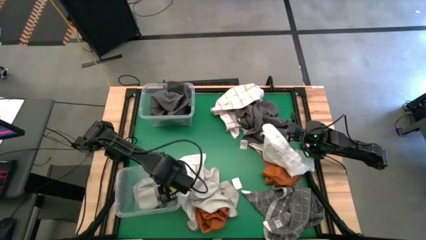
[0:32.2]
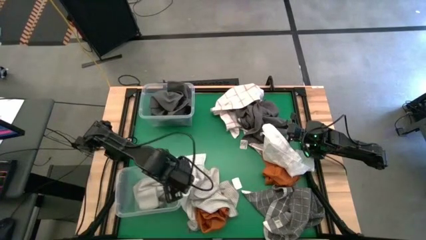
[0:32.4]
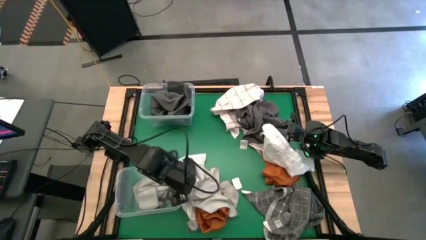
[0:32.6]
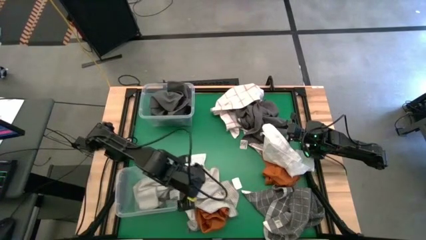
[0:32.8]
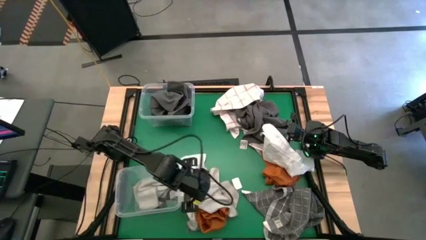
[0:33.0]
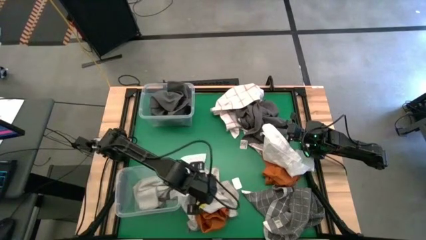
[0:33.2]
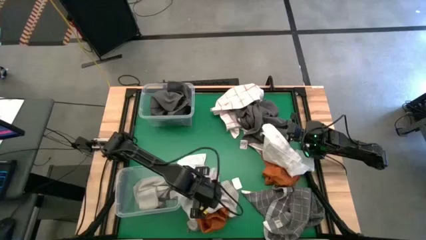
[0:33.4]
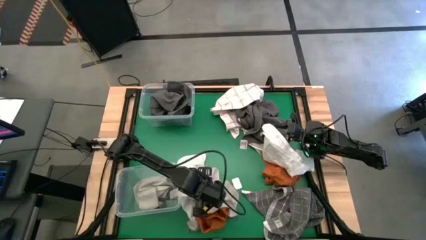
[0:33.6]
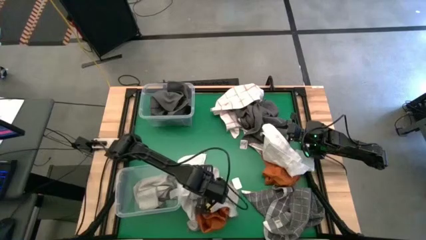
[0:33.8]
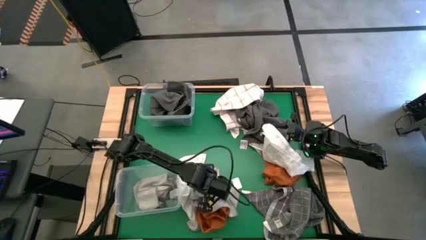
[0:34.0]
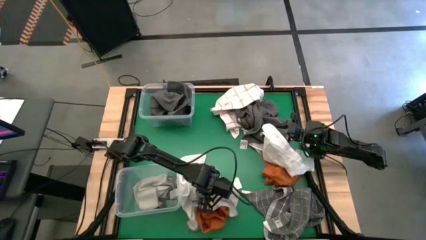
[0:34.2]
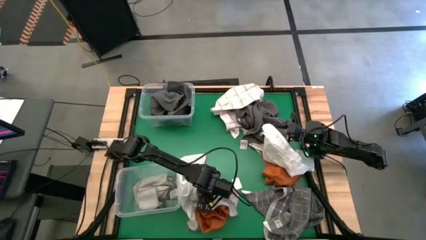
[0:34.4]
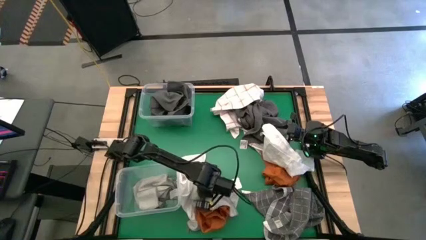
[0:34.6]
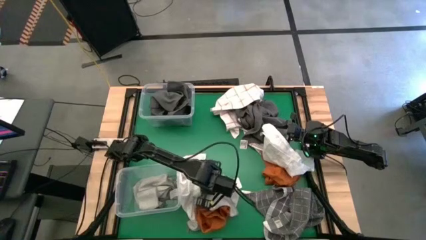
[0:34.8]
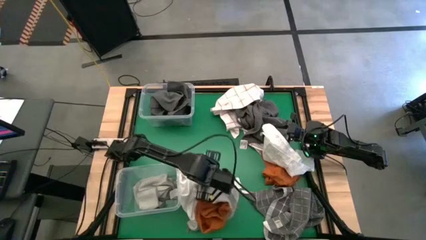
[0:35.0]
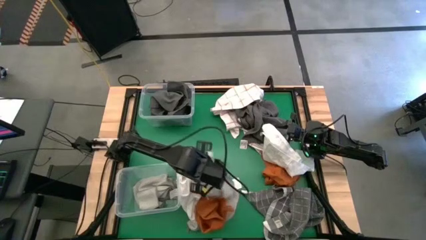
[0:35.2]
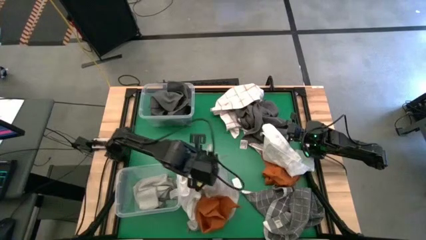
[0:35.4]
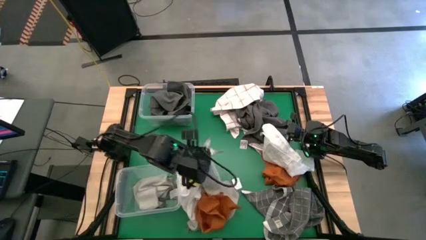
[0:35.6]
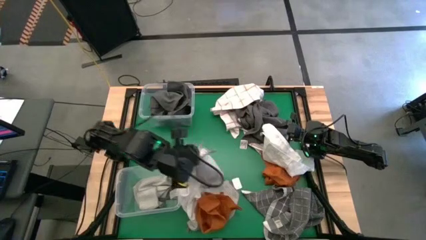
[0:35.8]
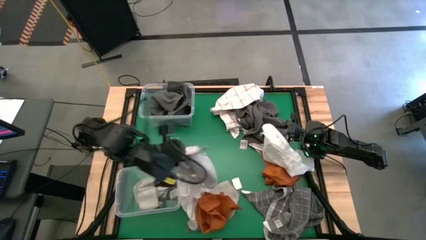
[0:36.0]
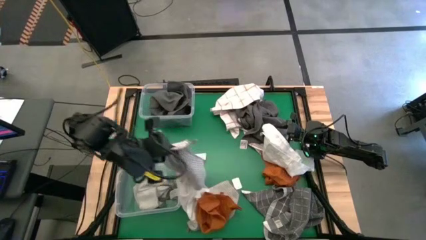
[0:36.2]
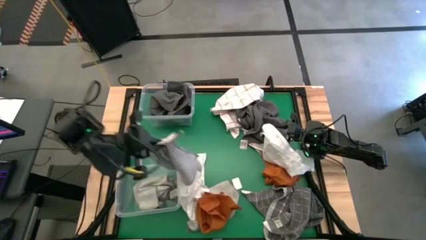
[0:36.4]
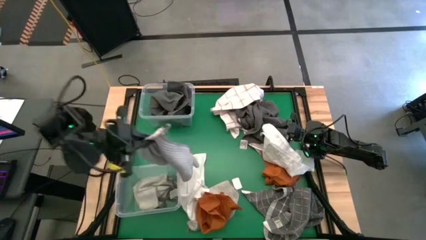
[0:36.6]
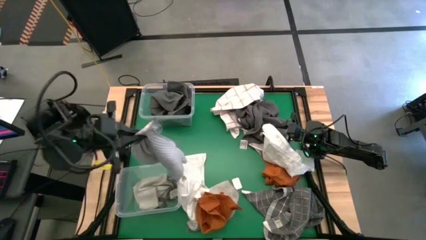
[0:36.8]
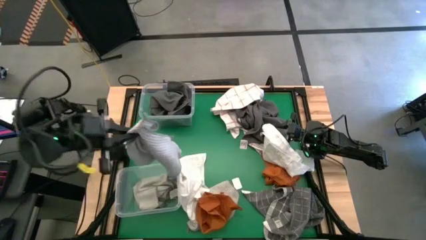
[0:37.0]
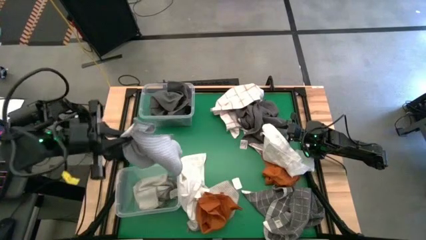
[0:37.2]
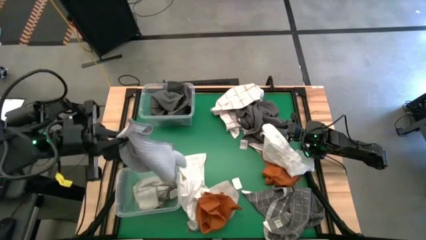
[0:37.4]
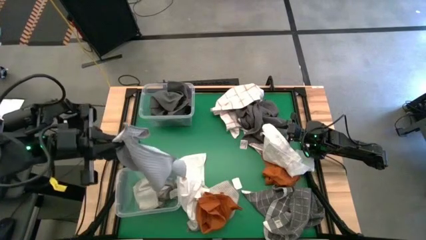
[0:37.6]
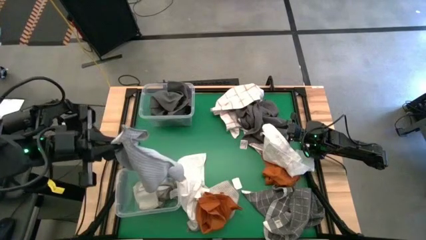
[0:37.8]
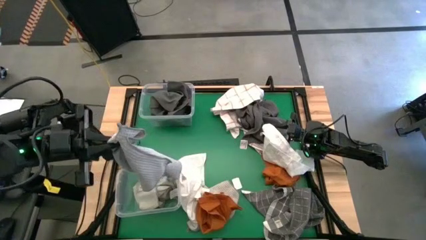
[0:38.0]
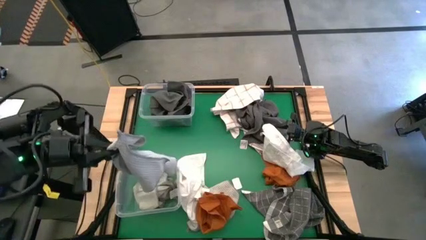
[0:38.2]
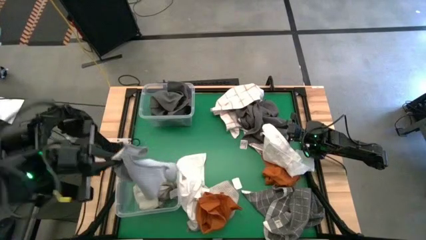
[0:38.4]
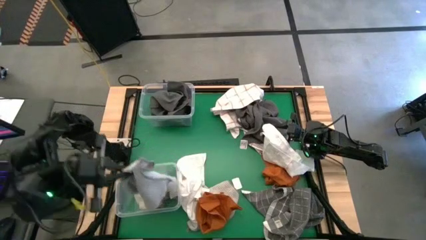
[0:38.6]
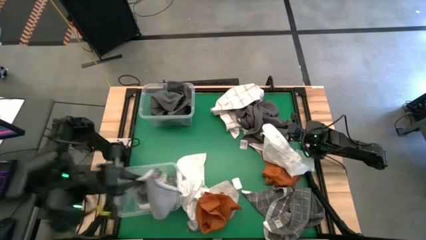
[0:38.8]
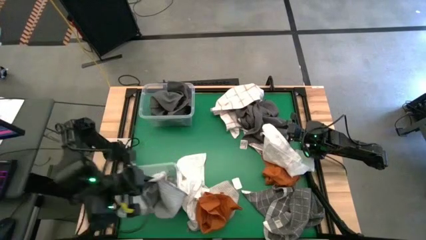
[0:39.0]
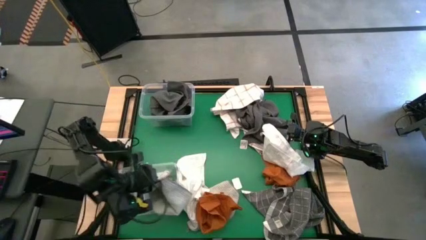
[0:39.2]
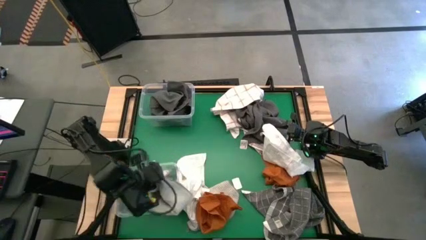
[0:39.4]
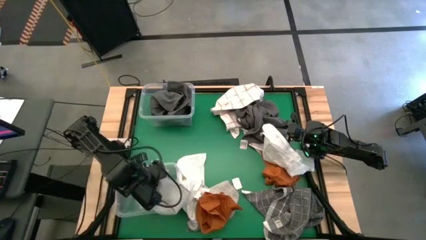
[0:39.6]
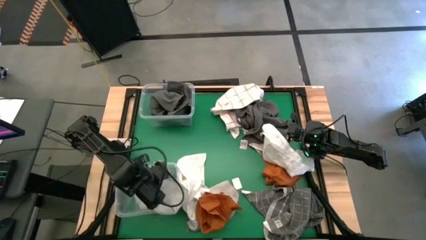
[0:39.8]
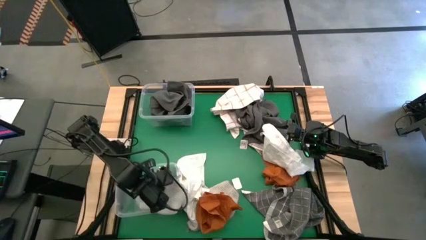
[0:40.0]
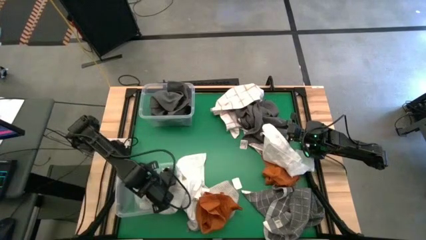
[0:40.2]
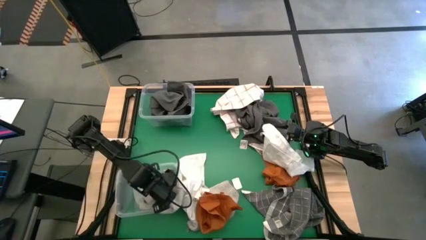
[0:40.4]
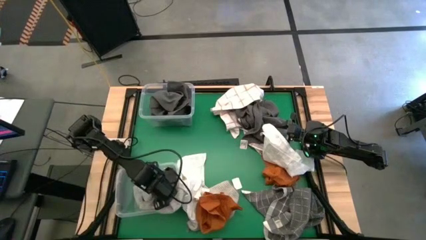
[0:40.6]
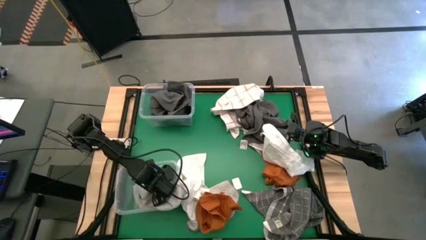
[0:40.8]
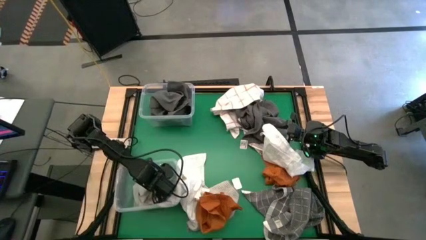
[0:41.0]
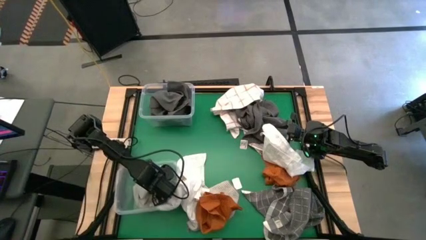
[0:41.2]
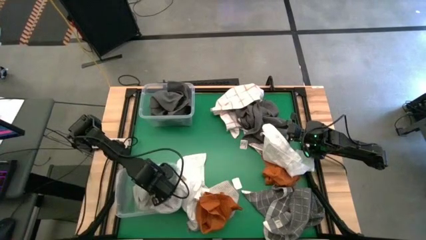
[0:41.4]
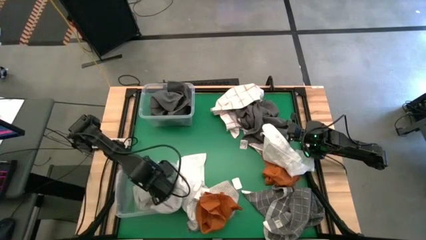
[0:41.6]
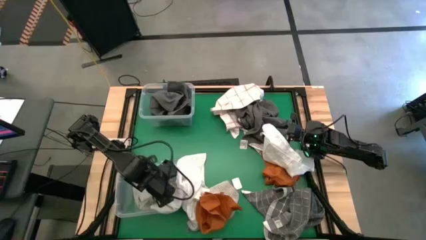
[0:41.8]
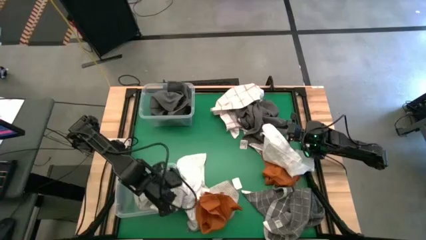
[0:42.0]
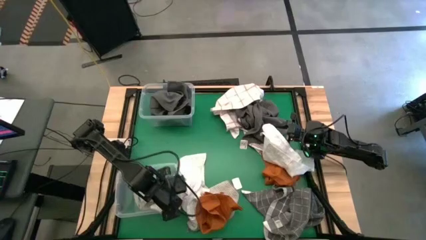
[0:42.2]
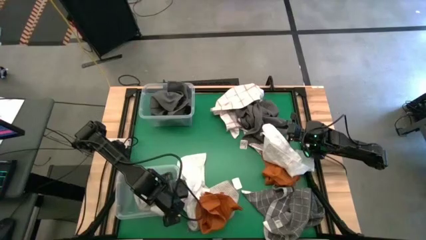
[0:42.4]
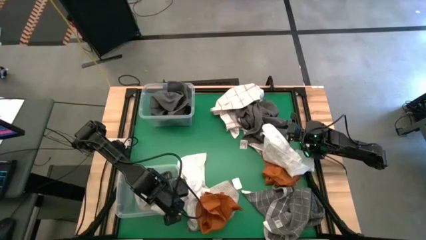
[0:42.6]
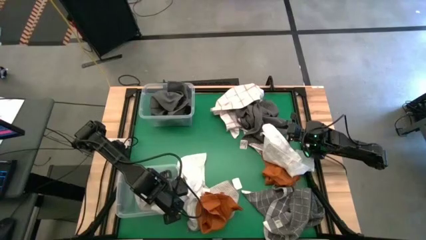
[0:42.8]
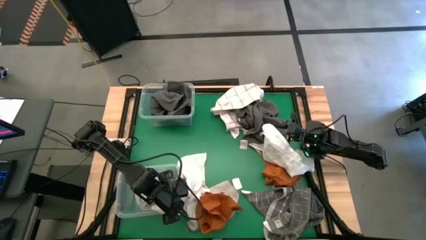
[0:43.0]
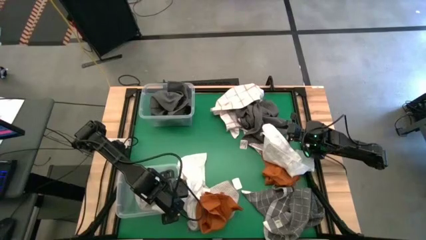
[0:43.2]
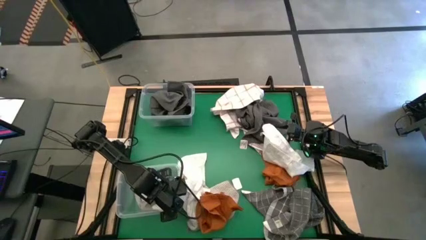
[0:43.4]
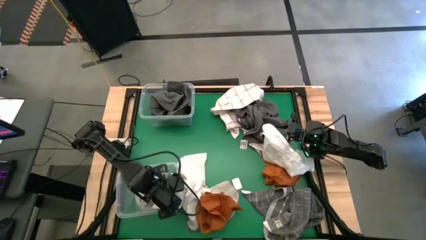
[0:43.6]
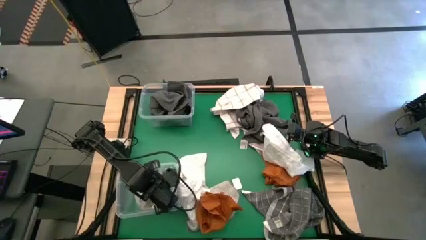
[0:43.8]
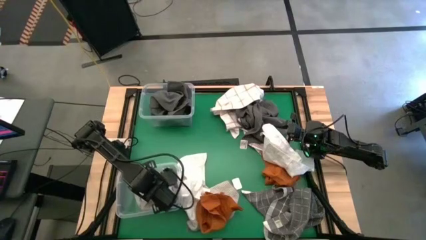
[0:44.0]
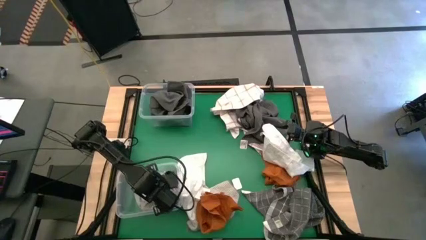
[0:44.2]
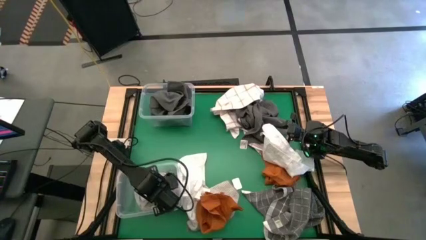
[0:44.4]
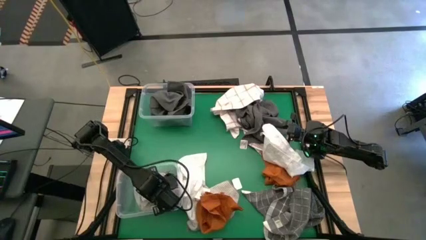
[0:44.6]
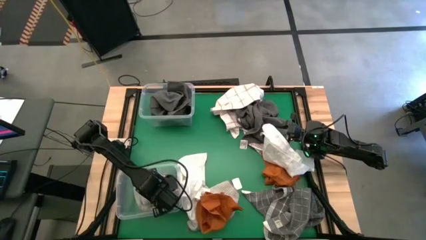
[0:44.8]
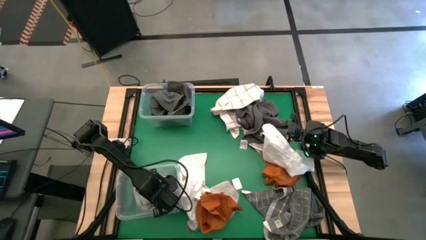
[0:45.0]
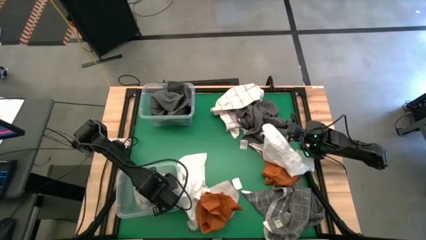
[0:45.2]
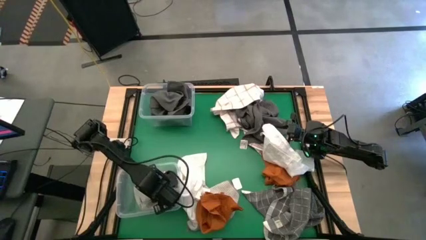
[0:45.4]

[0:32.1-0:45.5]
Task: Sort towels by color in basket
Put the gray towel into the bottom transparent bin

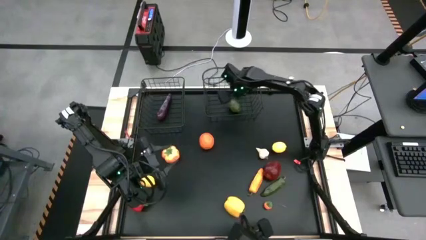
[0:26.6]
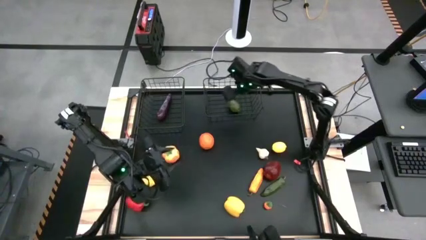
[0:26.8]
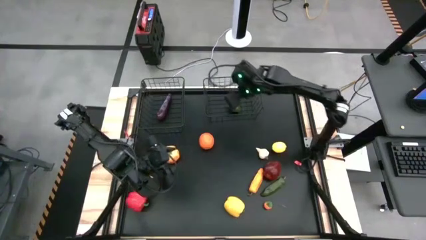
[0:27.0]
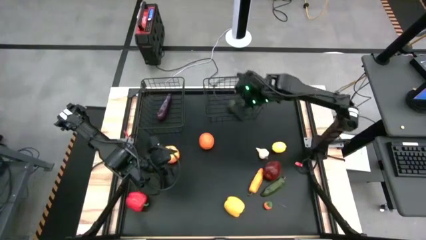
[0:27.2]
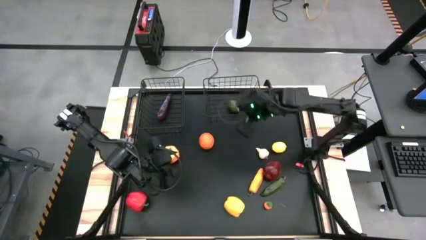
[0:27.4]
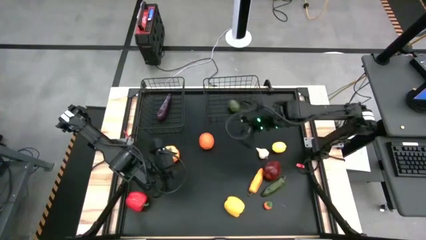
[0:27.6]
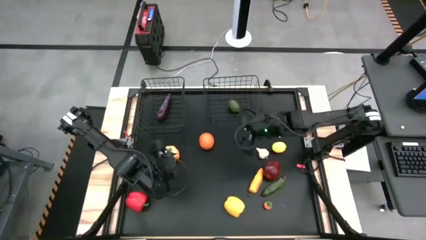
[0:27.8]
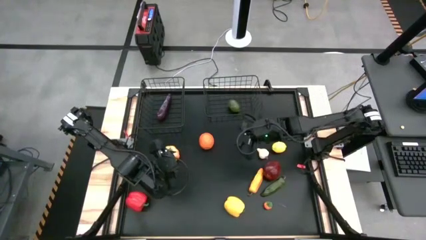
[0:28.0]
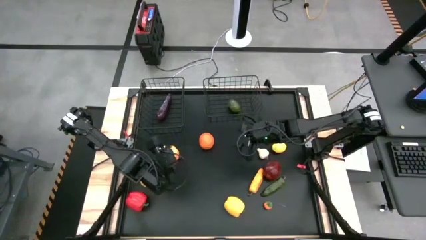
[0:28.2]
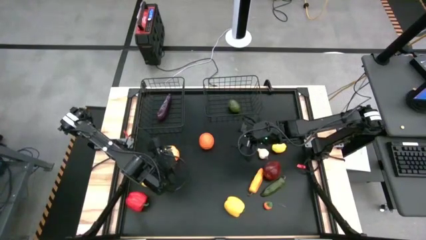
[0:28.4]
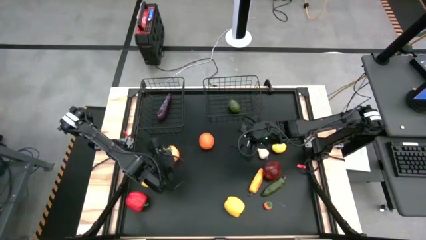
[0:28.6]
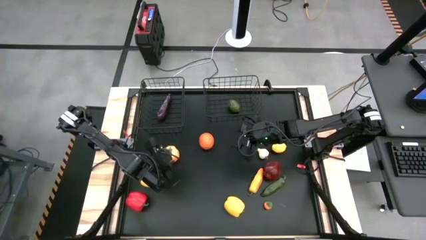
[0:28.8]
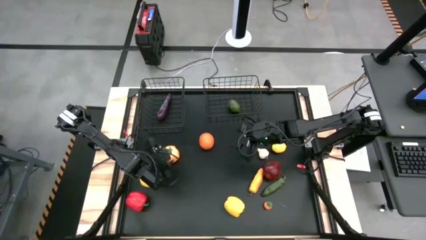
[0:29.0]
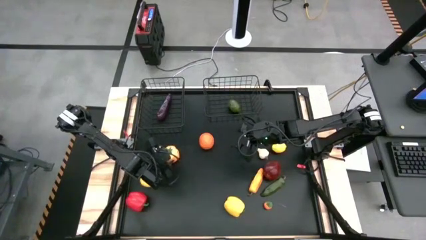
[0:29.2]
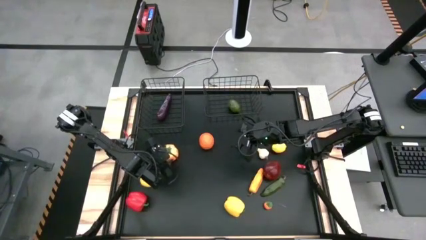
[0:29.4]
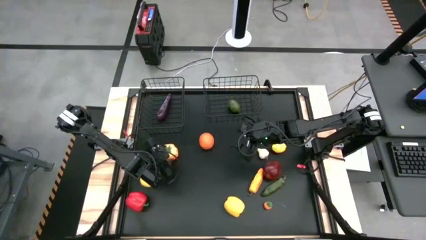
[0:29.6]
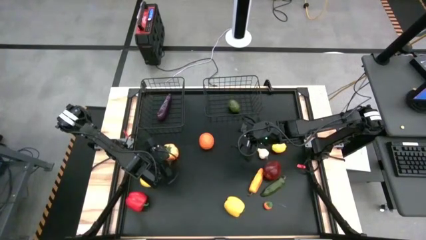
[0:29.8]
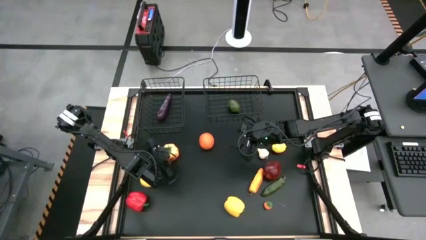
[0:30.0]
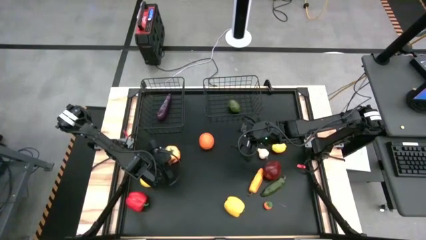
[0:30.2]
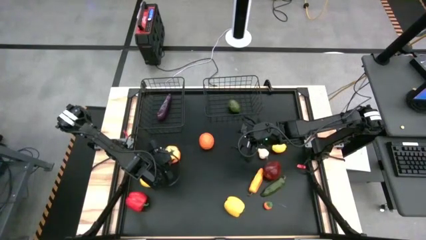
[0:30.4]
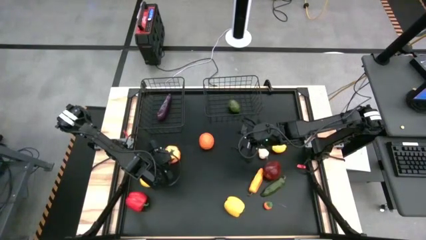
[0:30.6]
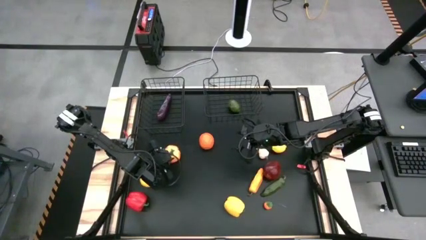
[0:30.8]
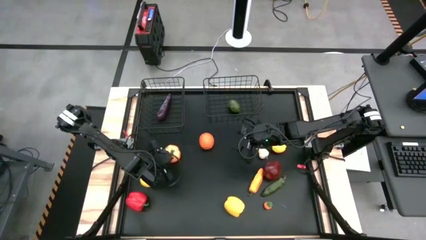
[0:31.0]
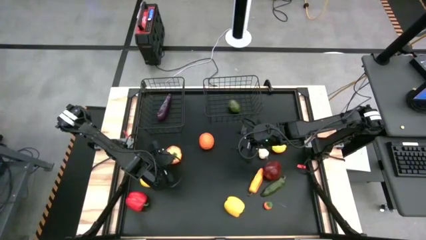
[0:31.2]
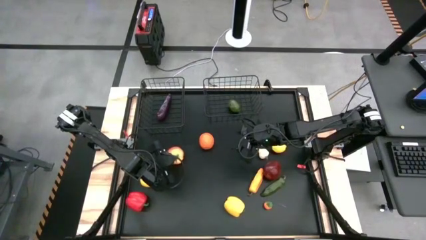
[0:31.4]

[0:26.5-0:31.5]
Task: Sort produce into baskets
Put the orange tomato into the right black wire basket
